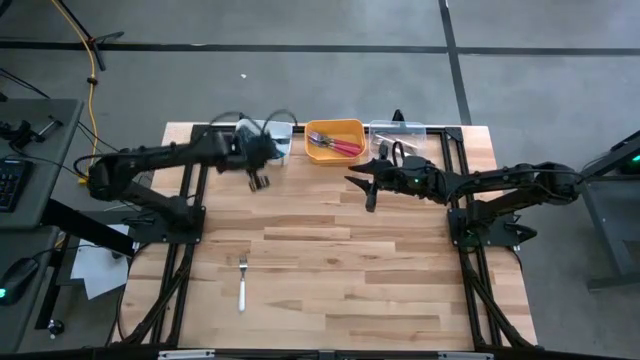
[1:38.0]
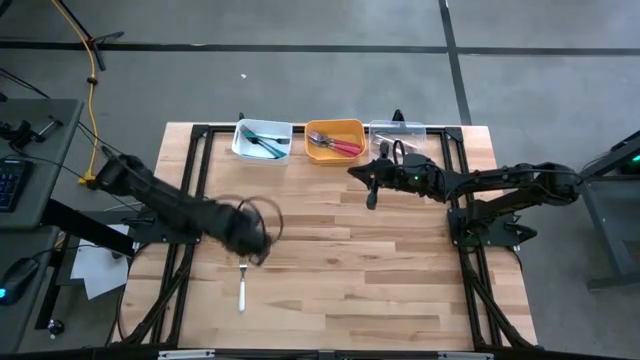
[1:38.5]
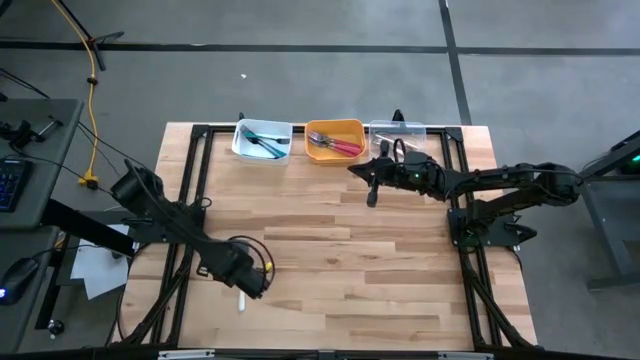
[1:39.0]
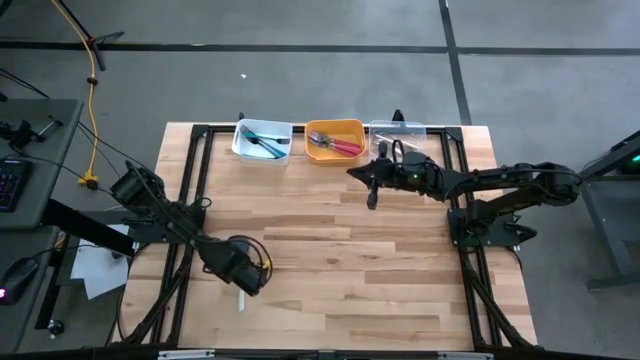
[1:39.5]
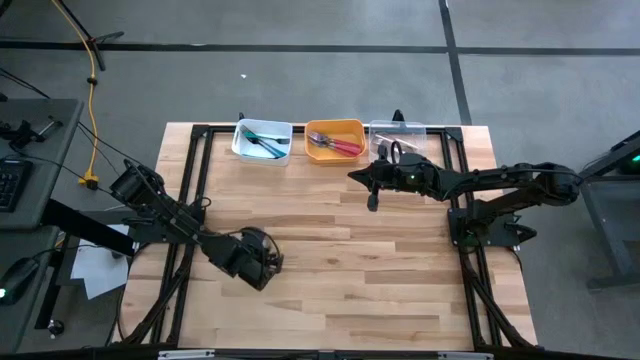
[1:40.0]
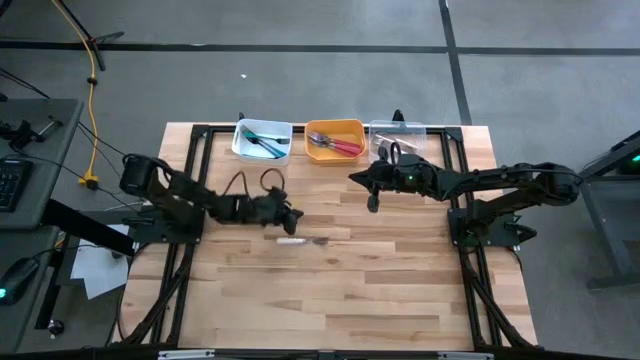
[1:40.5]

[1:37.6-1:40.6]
Task: Sort silverware by color (type)
Put the white fork into the transparent bin

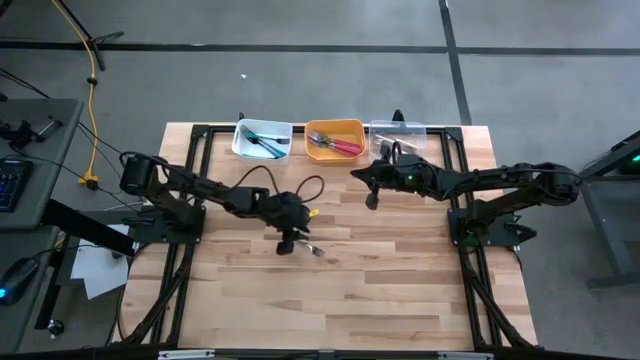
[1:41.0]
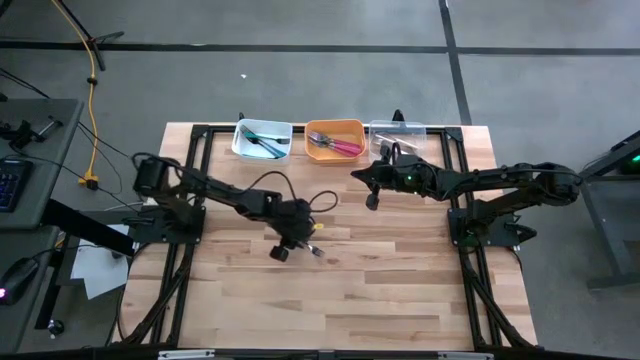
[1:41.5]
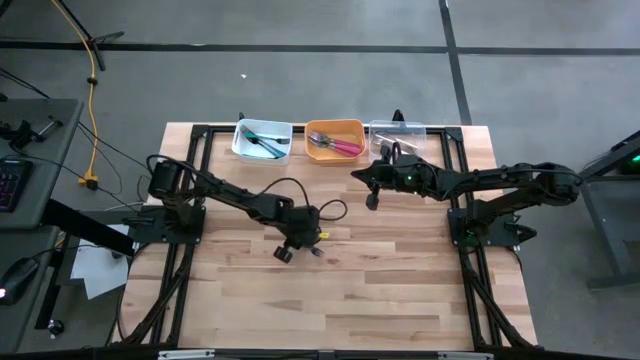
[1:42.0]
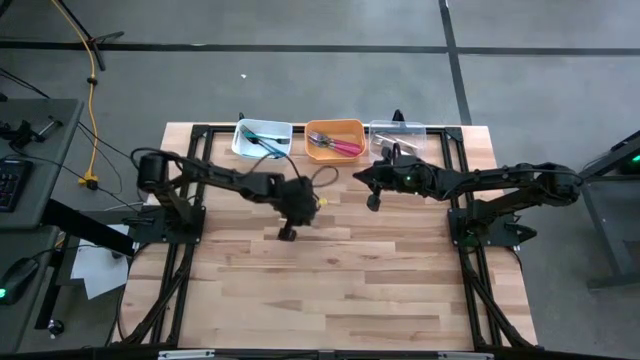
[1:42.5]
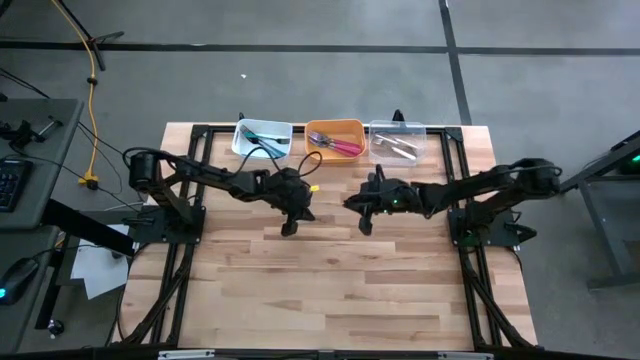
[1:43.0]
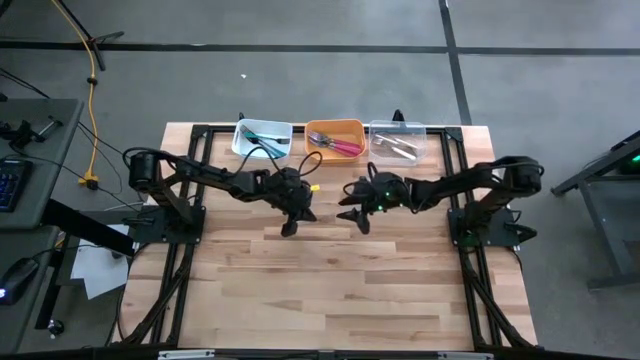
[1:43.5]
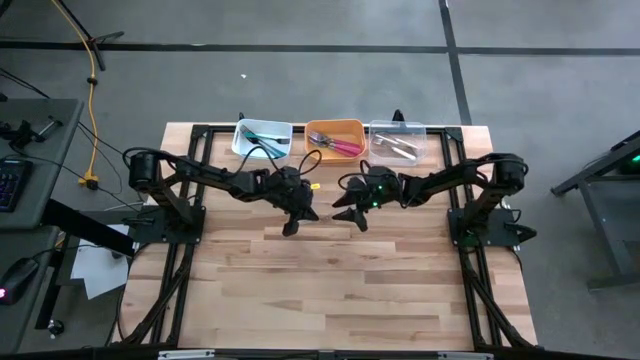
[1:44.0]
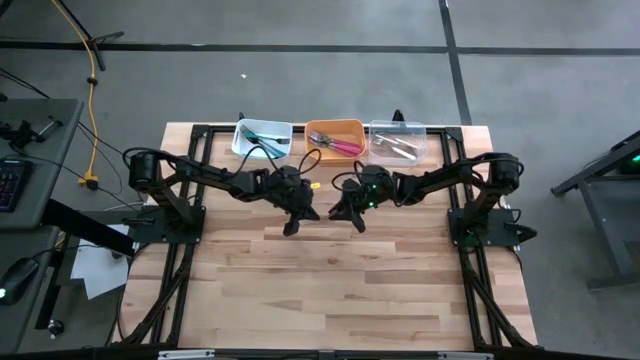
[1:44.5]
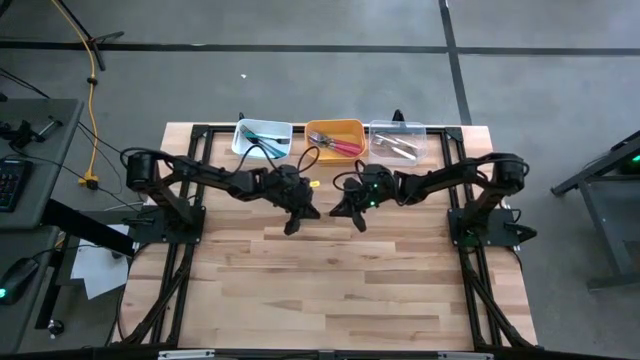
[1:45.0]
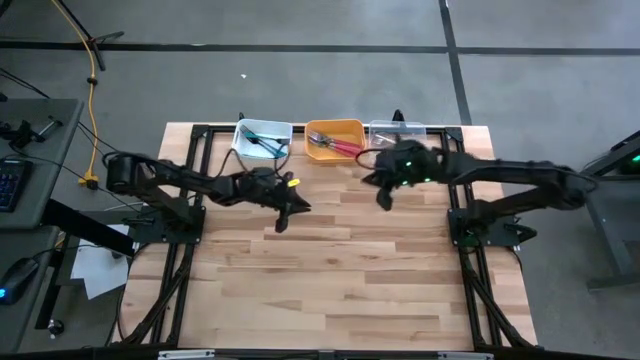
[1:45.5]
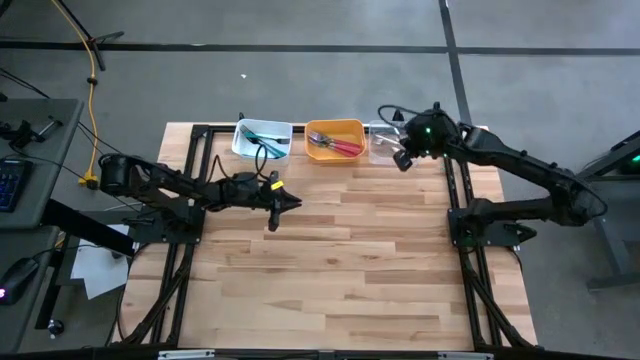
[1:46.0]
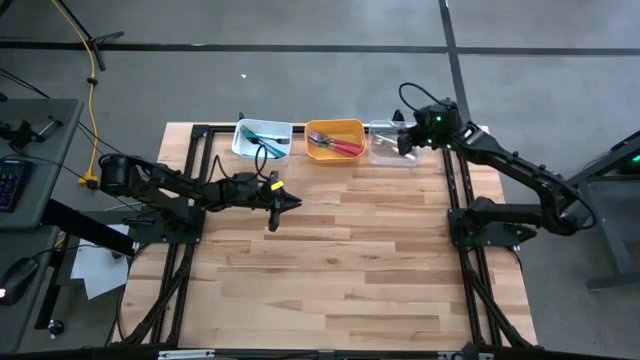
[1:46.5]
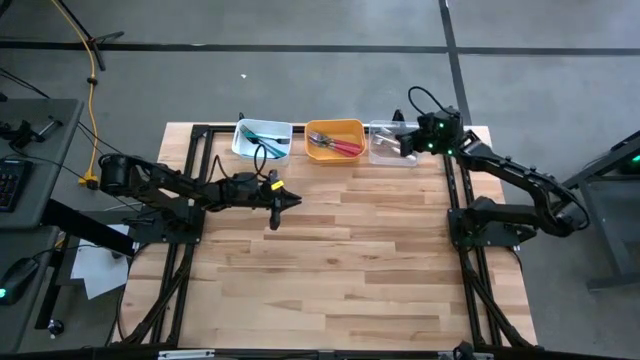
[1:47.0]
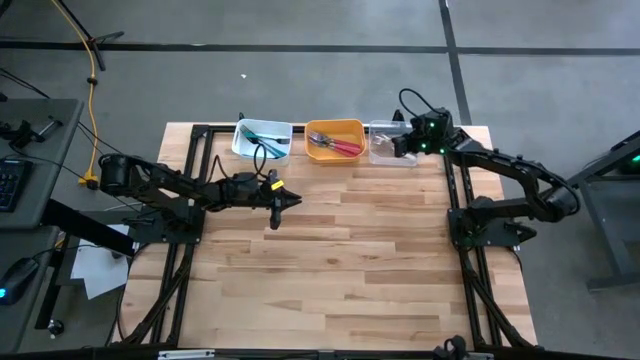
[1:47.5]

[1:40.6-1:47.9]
Put the white fork into the transparent bin

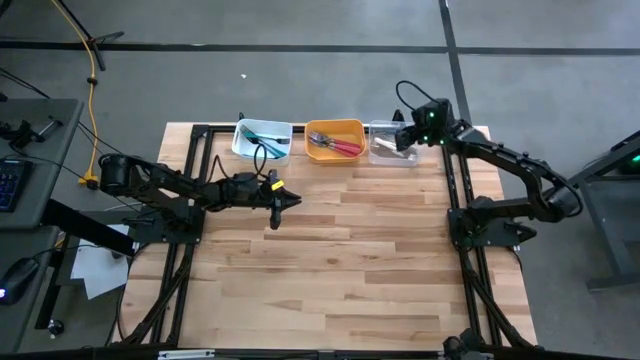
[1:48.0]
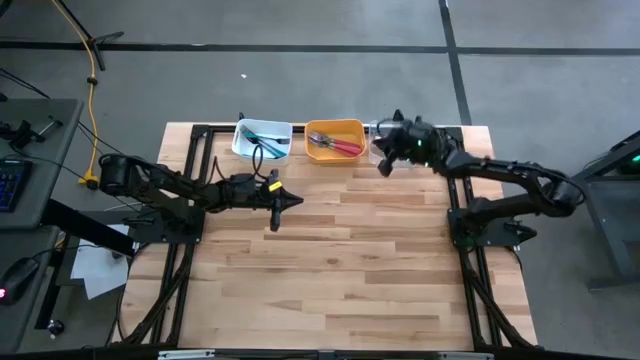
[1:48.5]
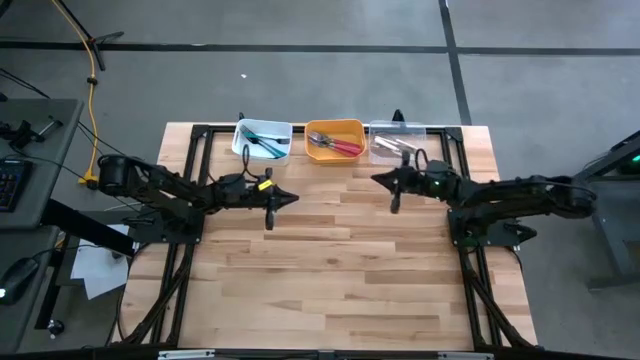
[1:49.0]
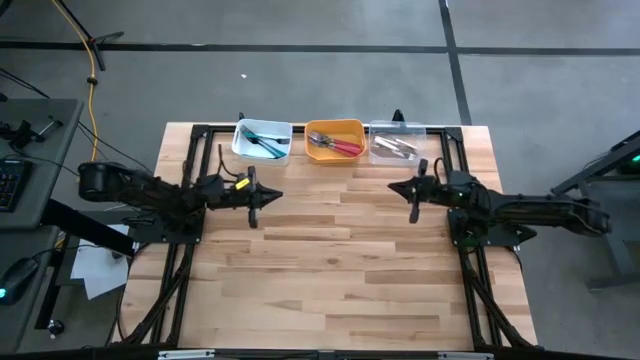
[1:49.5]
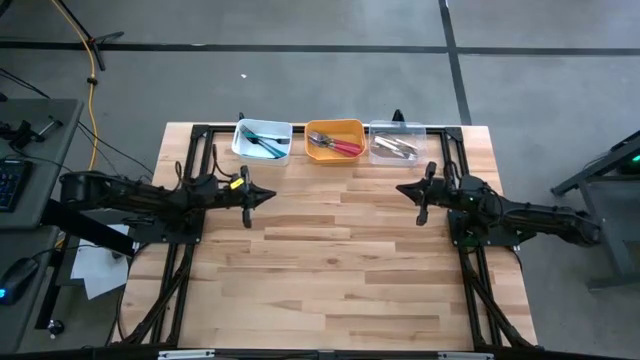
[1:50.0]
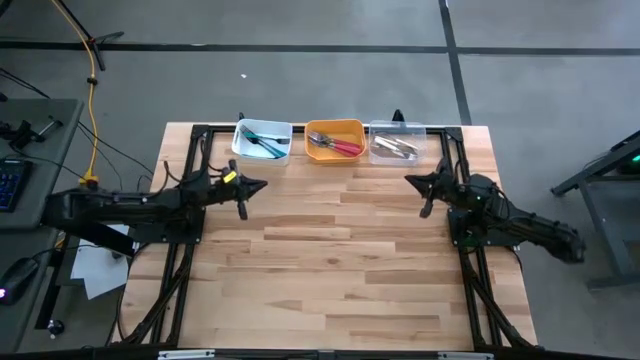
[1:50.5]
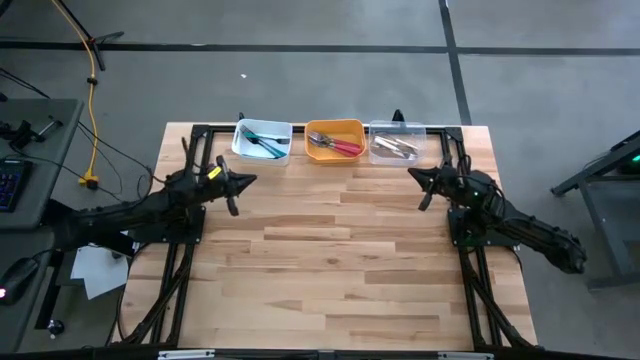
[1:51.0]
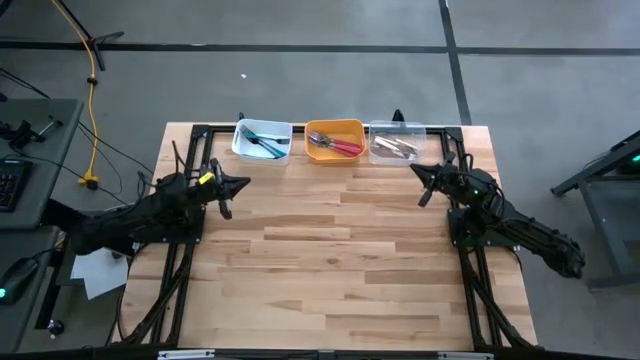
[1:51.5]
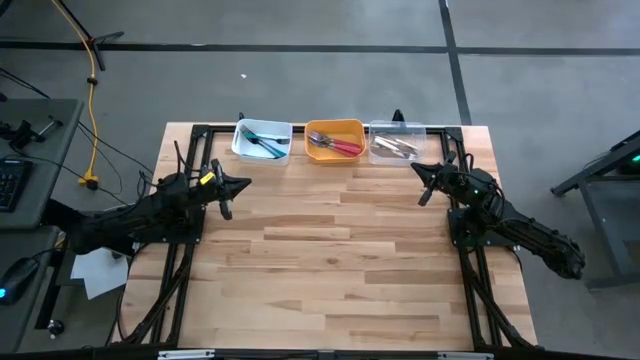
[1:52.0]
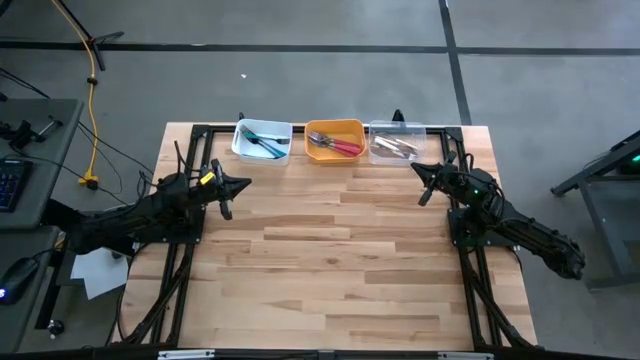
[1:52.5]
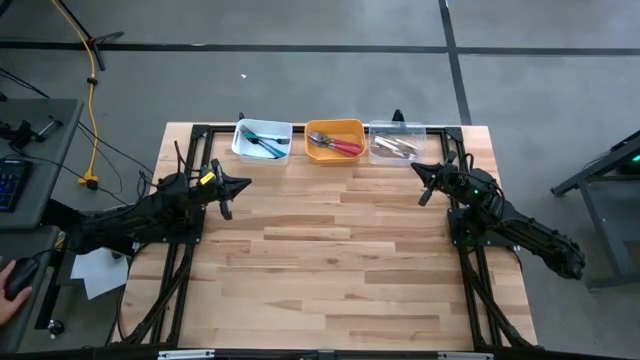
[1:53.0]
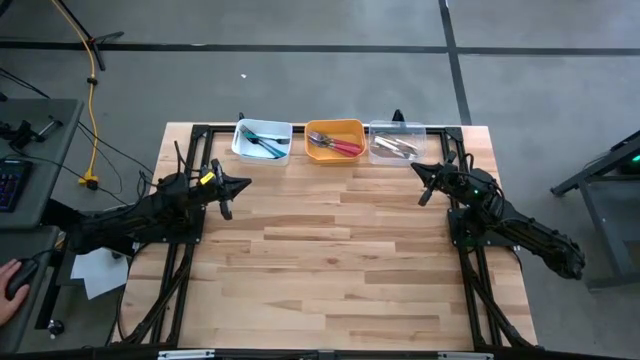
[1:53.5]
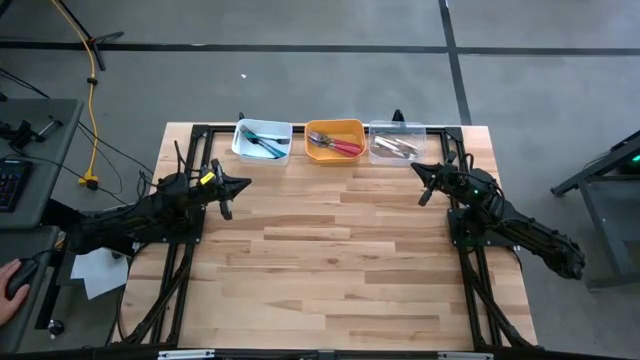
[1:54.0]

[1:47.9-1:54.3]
Return to Home Position

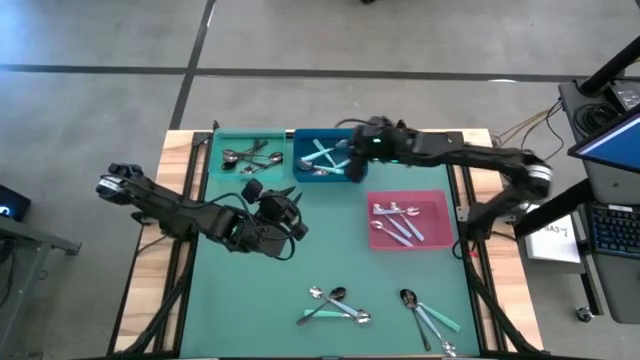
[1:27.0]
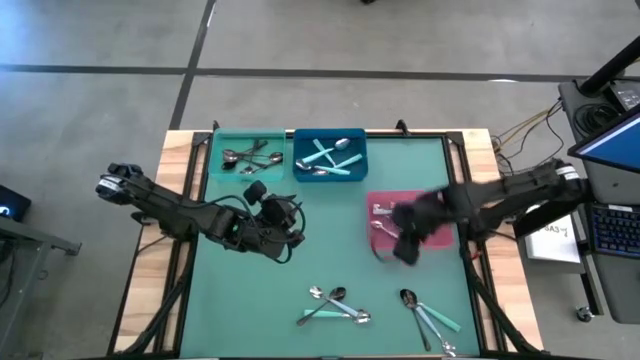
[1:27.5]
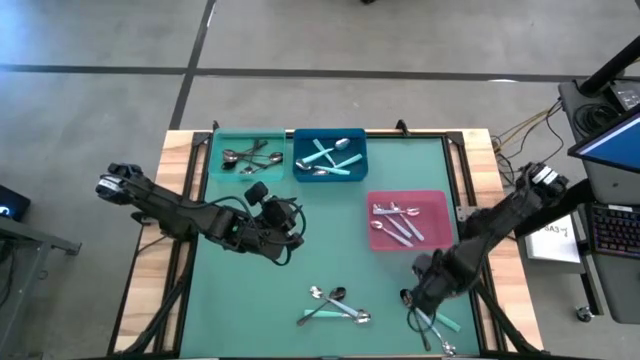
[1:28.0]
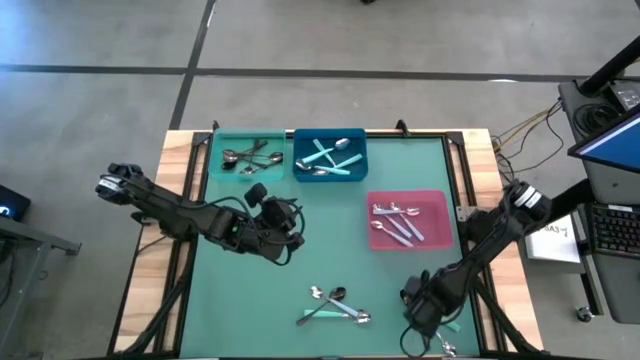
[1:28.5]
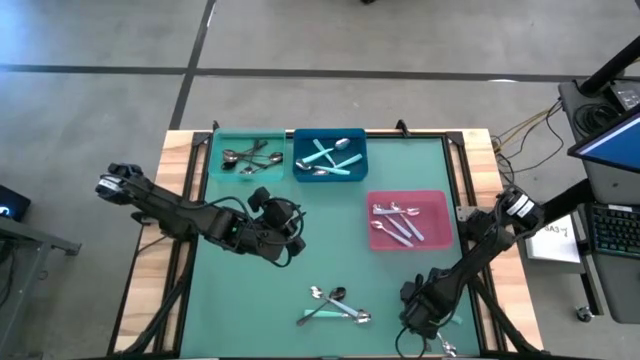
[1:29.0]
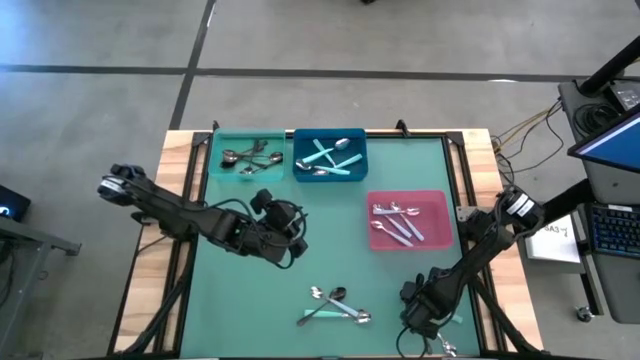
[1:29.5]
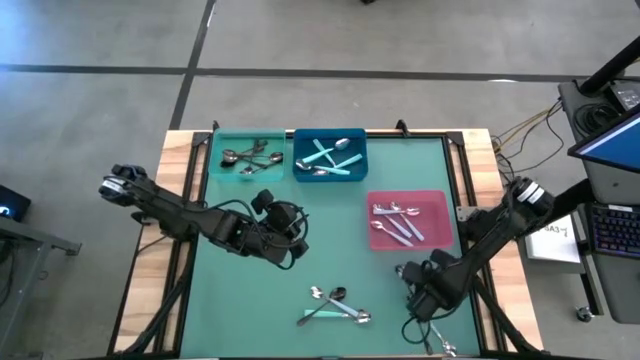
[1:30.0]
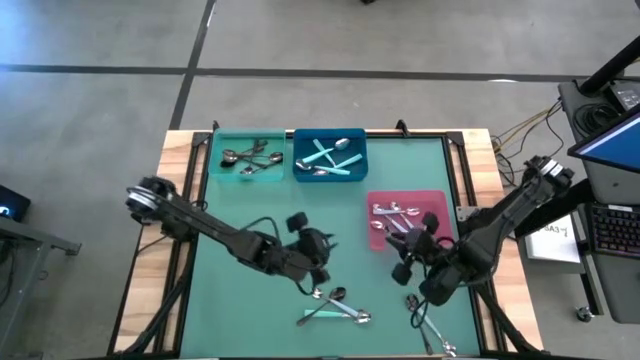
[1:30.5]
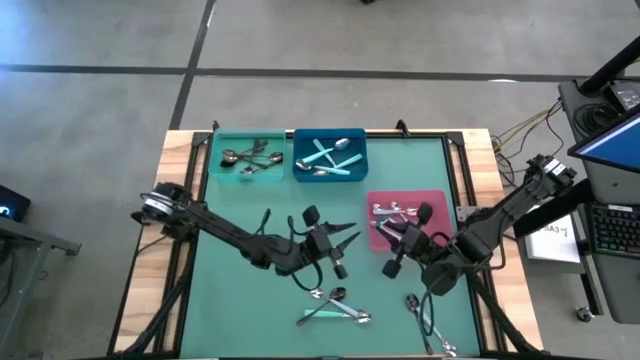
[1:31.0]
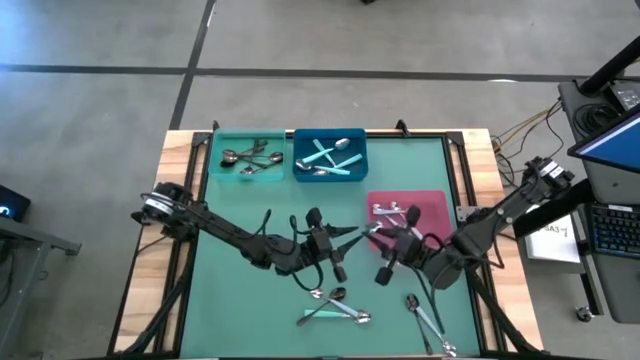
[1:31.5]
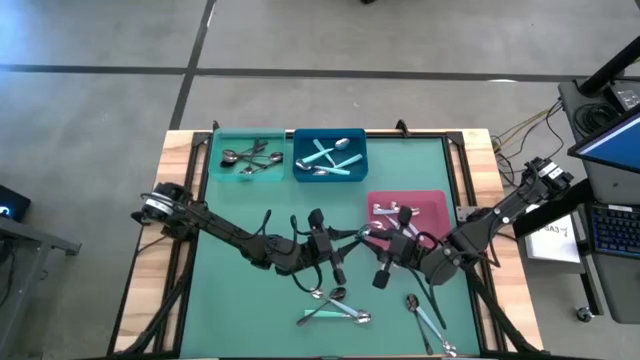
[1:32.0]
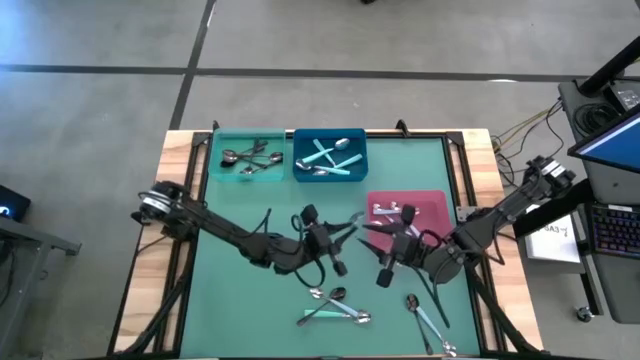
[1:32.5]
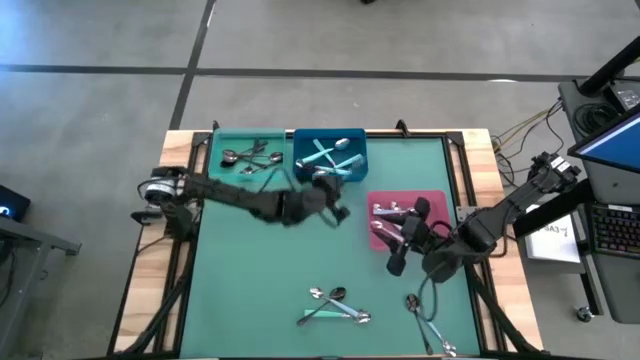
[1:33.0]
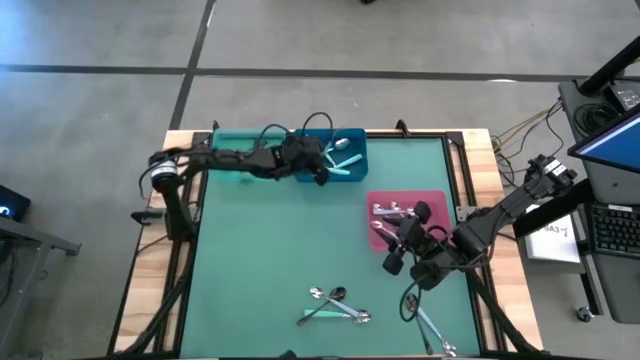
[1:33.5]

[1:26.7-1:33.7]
Task: Sort silverware by color (type)
Put the green spoon into the blue bin
